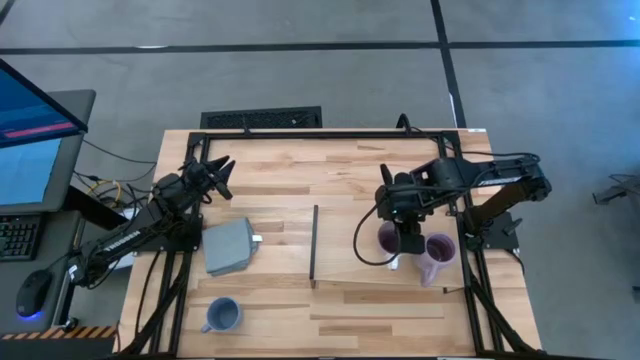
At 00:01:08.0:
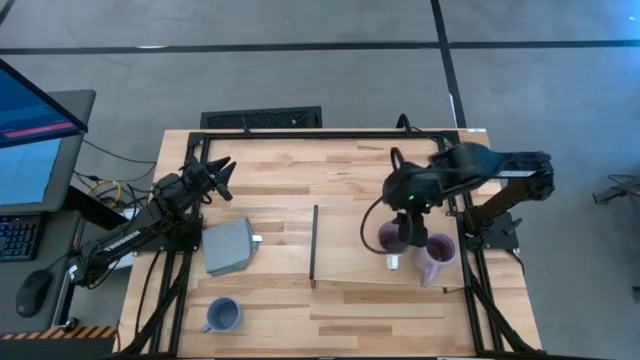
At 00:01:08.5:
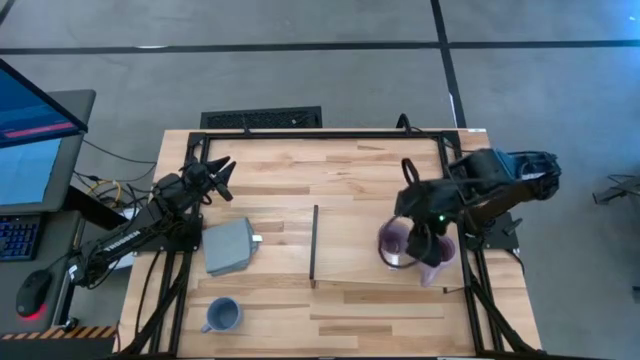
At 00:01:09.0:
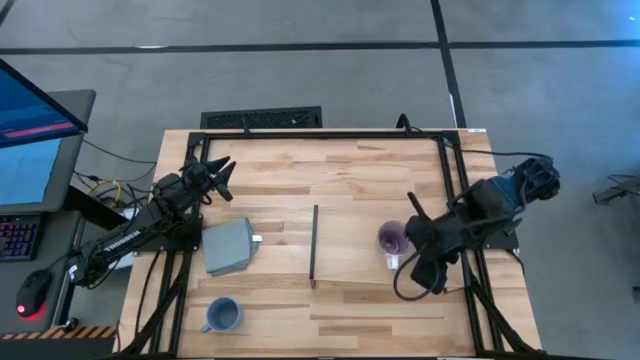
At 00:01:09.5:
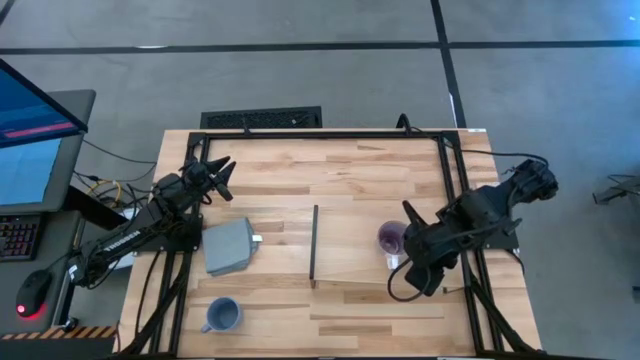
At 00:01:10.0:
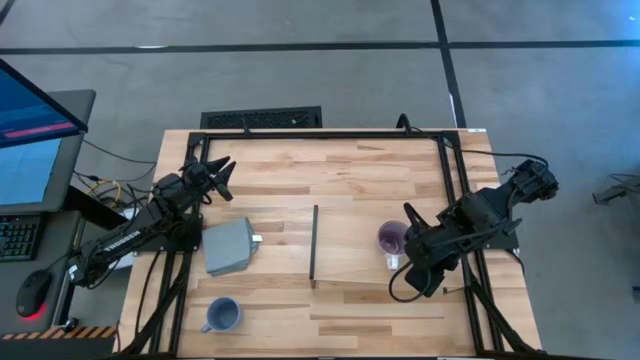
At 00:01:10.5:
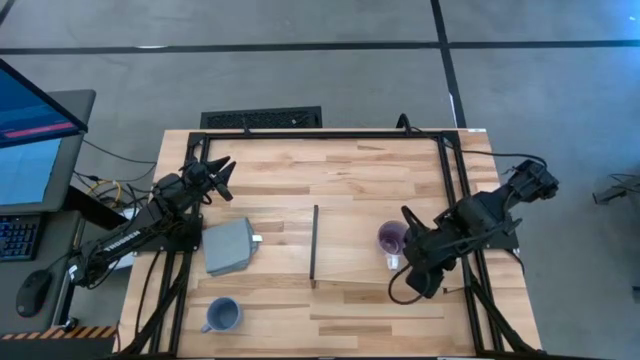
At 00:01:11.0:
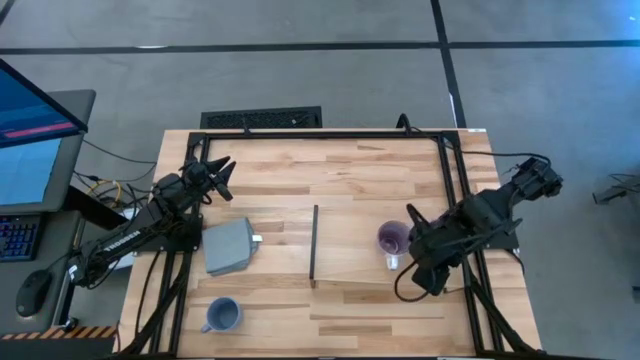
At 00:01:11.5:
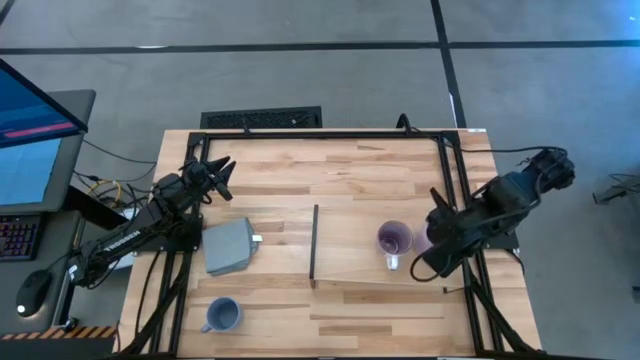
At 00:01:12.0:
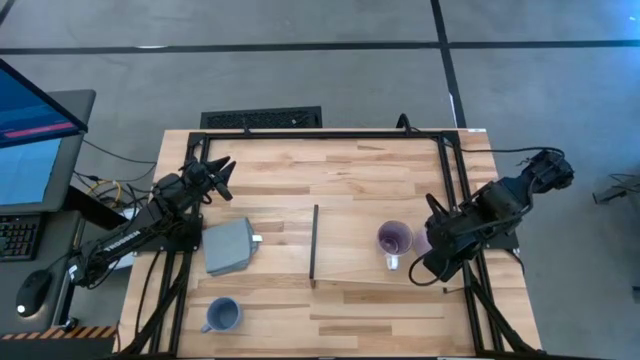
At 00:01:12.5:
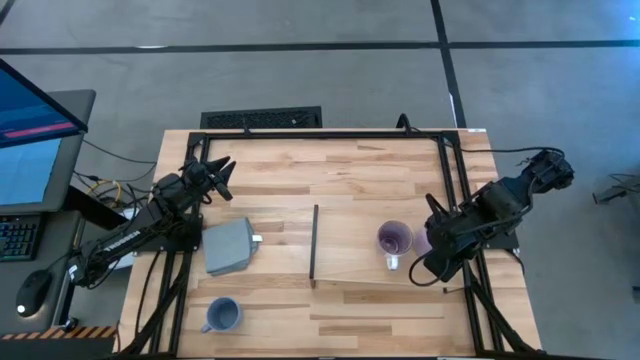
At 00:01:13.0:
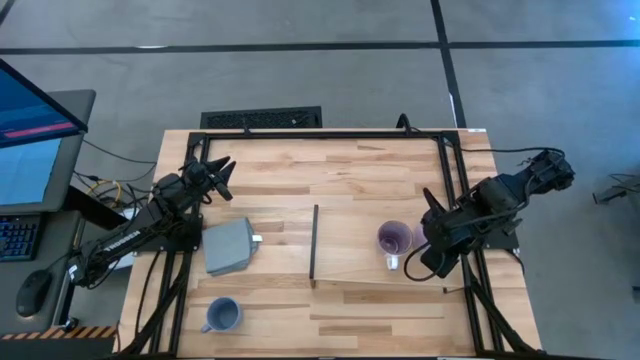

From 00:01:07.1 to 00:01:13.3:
Task: Stack small to large cups/mugs on shelf
Adjust the purple mug on the shelf

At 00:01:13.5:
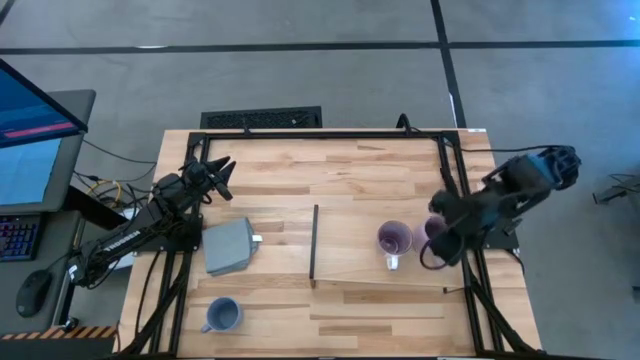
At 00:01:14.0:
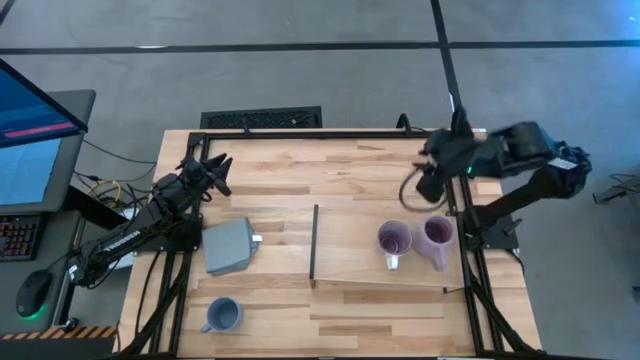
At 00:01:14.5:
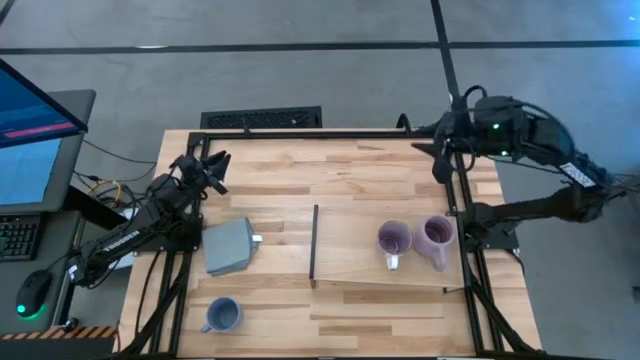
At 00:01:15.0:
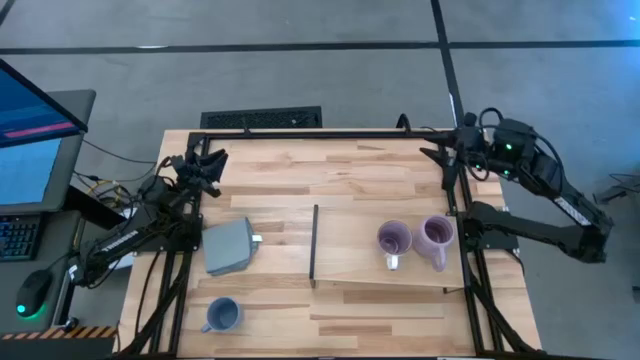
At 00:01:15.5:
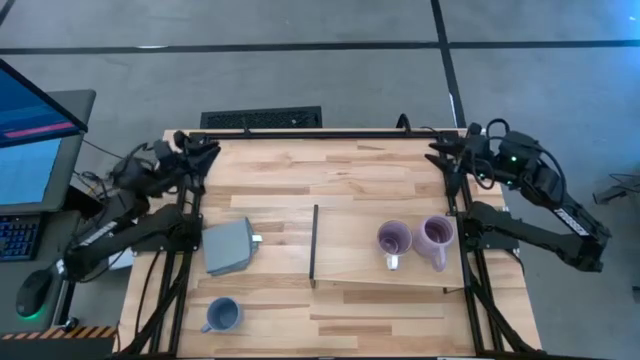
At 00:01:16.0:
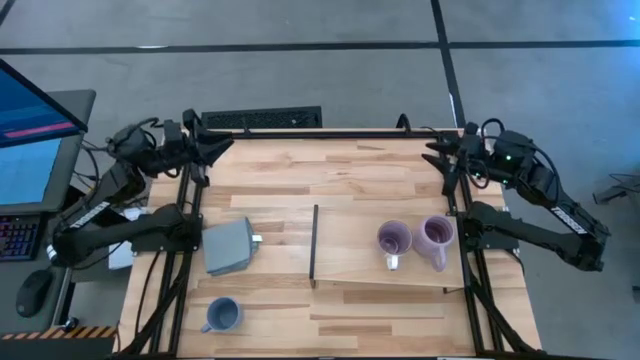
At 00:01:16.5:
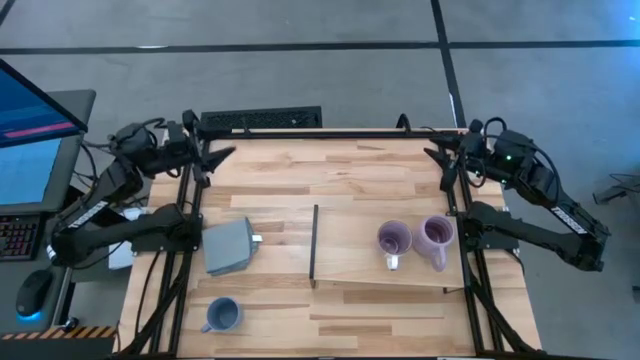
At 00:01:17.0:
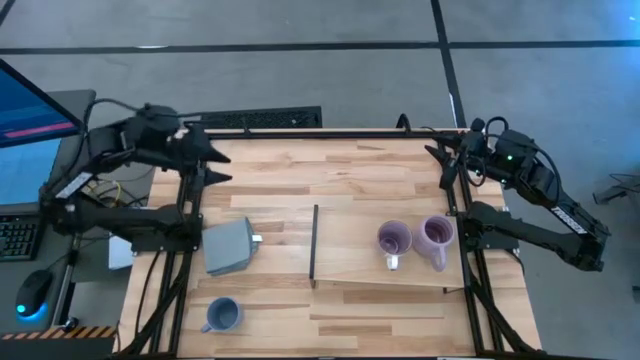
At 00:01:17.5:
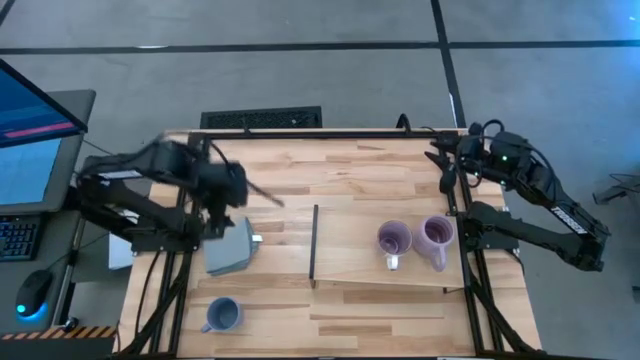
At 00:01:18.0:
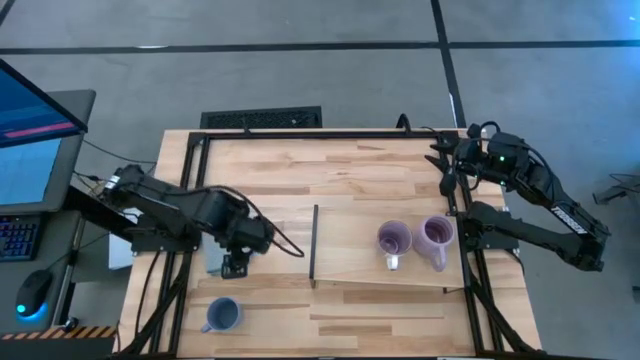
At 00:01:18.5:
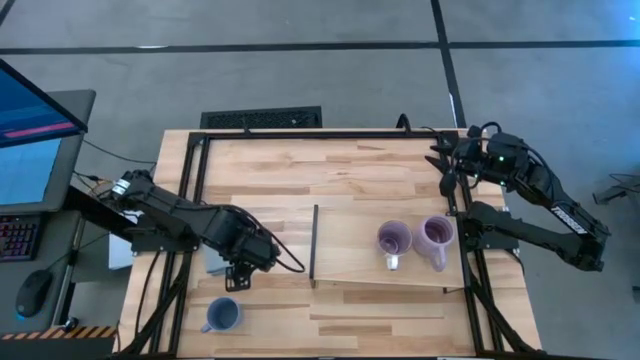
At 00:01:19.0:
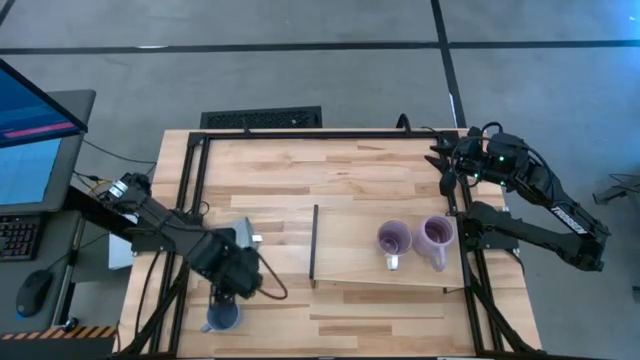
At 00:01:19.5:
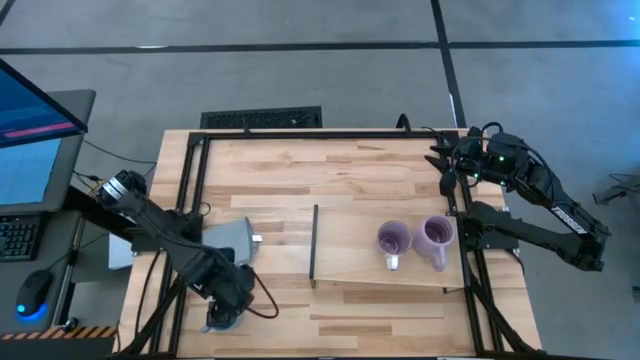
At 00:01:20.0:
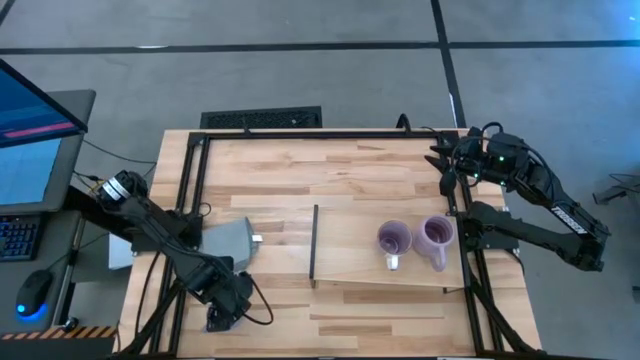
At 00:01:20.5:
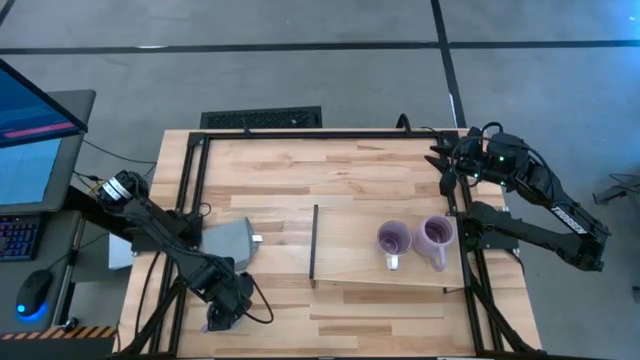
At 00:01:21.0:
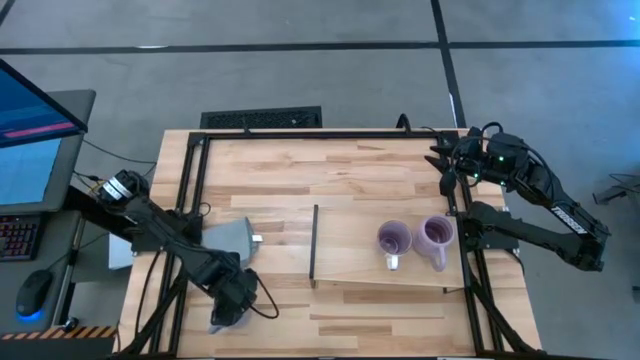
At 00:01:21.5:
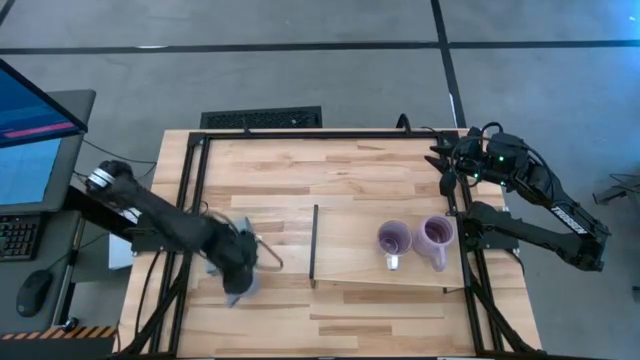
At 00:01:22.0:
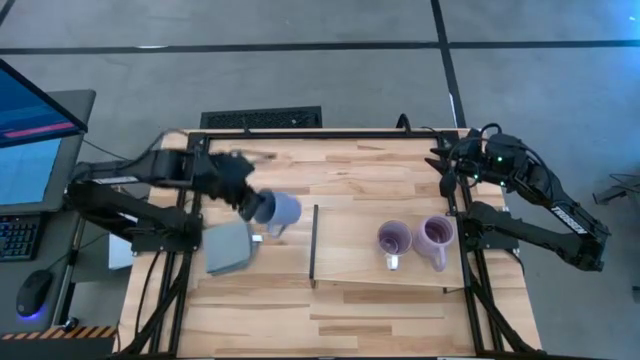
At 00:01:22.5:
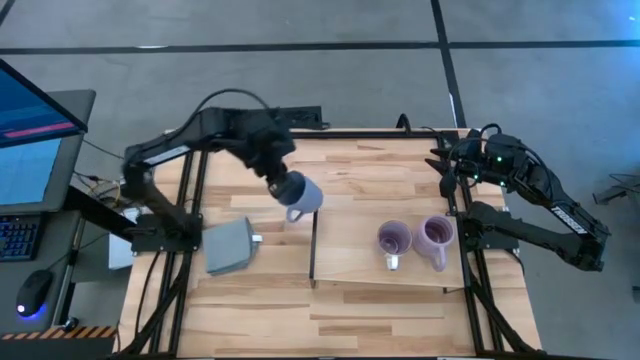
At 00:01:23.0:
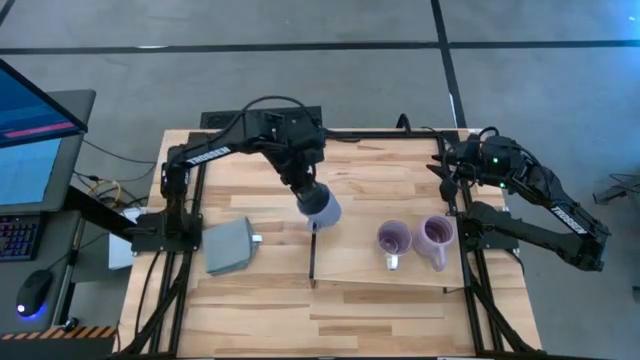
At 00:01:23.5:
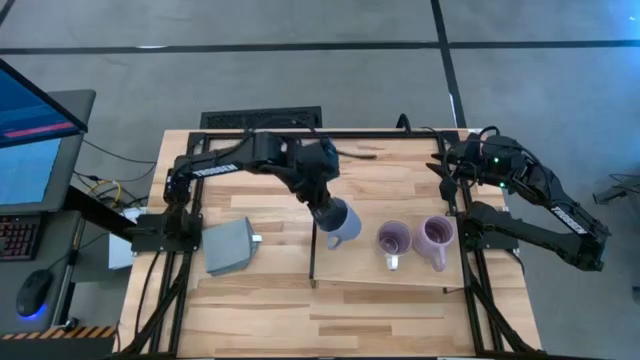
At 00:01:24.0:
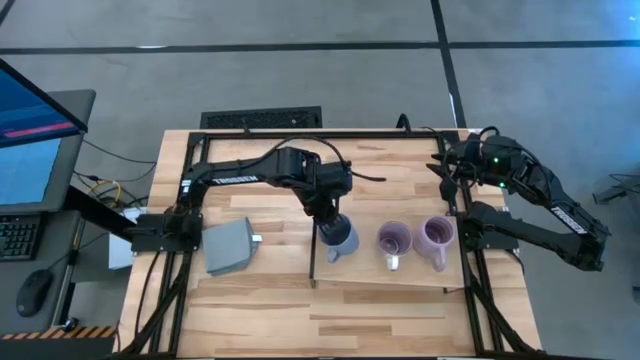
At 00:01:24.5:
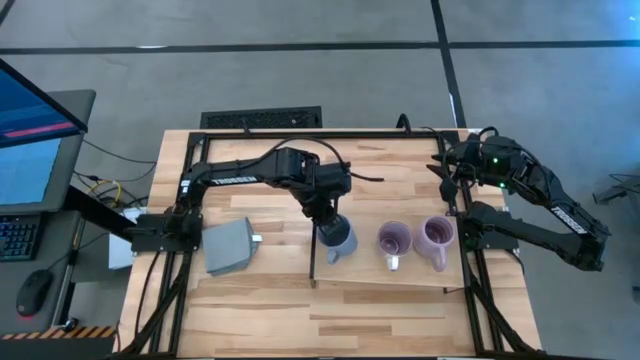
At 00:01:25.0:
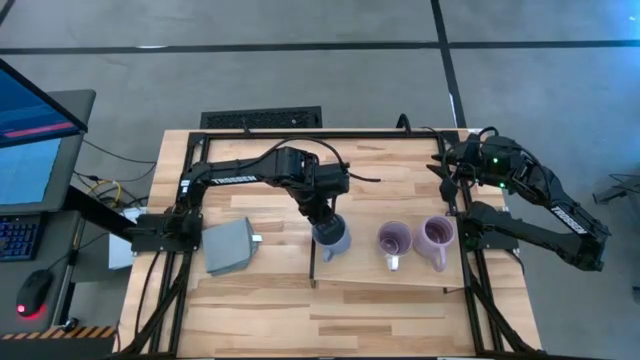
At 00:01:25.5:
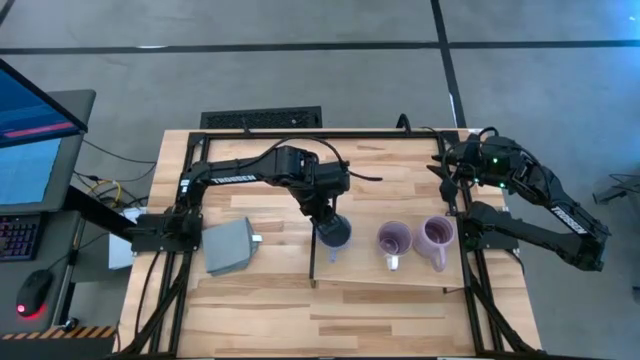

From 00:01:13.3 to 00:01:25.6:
Put the blue mug on the shelf

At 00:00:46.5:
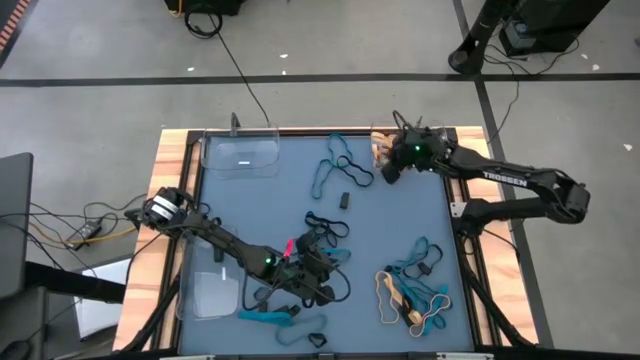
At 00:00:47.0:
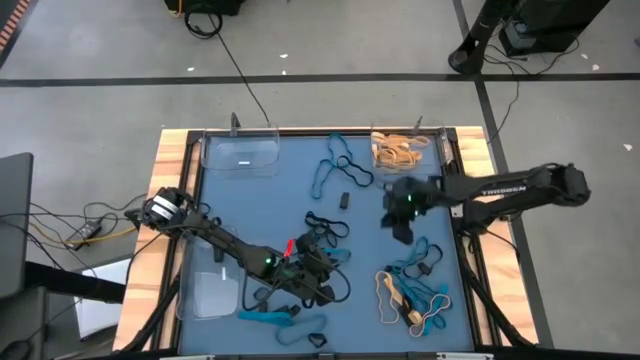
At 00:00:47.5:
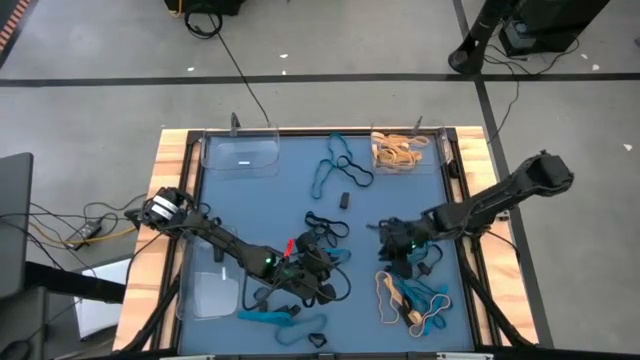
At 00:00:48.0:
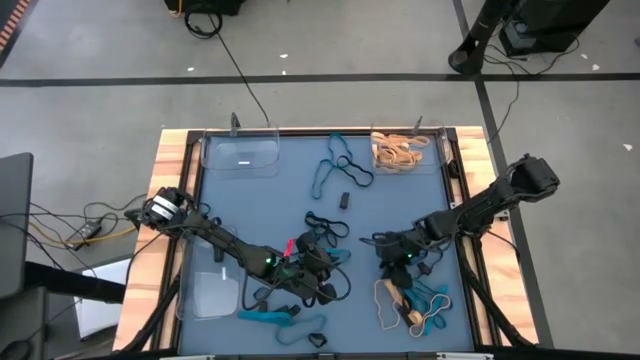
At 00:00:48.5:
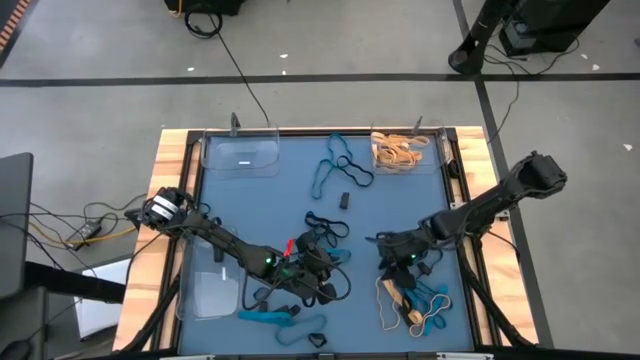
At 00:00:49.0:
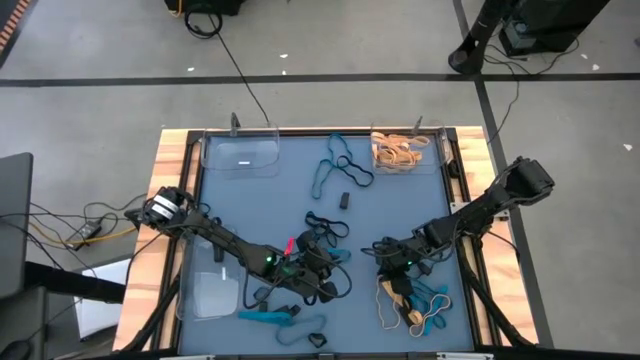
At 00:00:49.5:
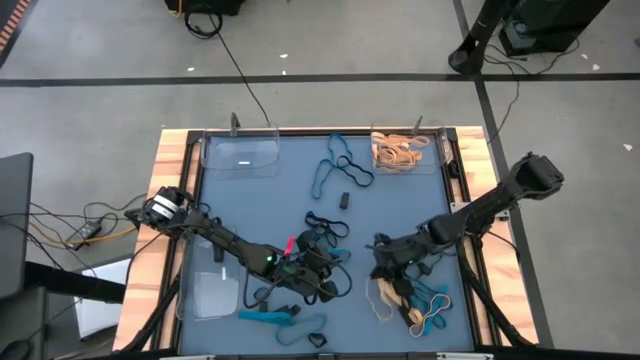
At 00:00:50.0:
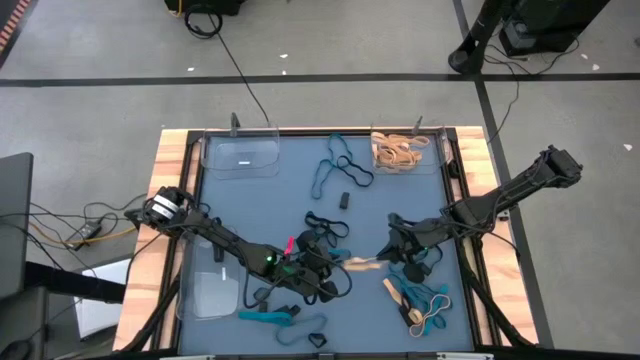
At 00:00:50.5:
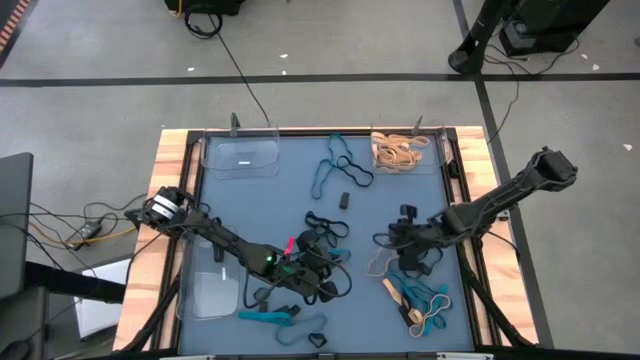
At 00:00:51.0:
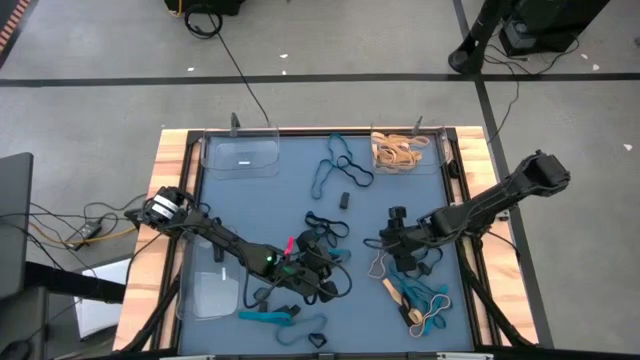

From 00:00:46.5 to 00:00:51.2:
Task: Sort rubber bands into baskets
Put the yellow rubber band into the top right transparent bin
